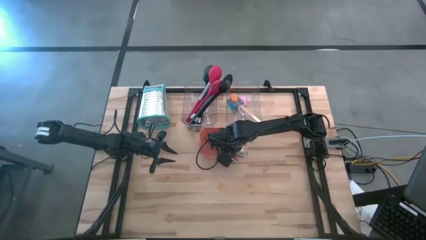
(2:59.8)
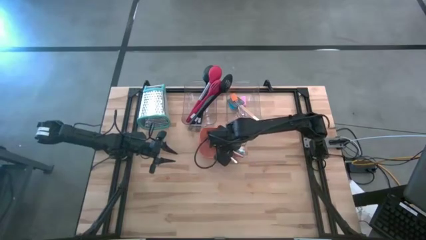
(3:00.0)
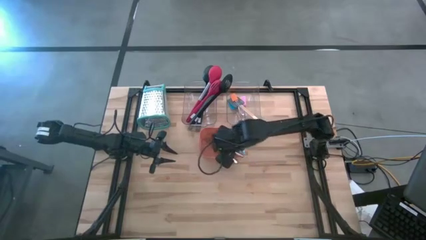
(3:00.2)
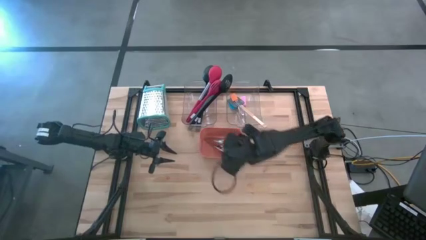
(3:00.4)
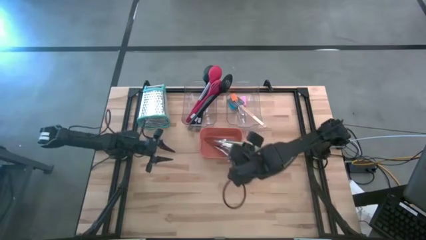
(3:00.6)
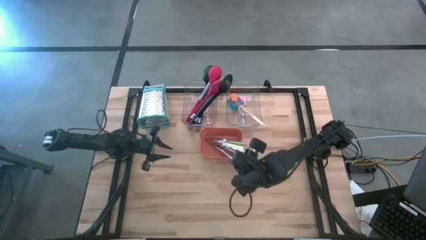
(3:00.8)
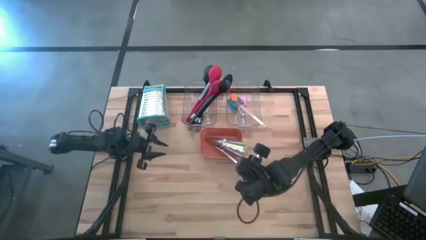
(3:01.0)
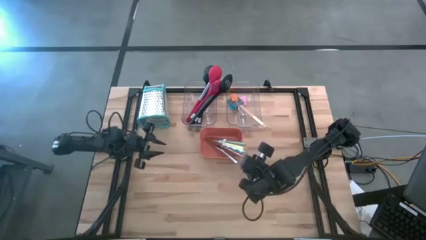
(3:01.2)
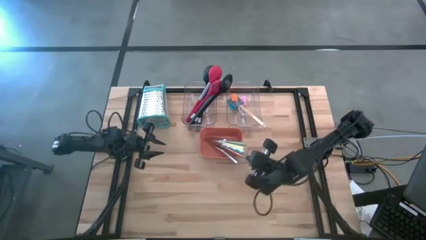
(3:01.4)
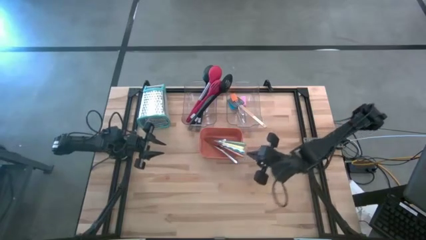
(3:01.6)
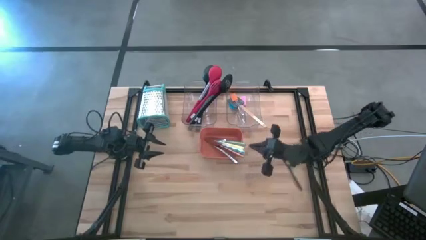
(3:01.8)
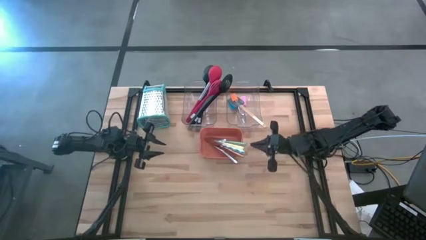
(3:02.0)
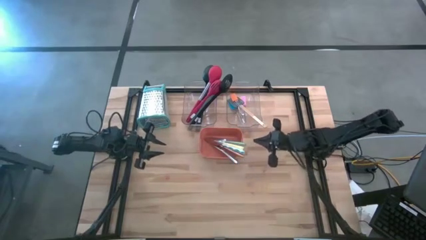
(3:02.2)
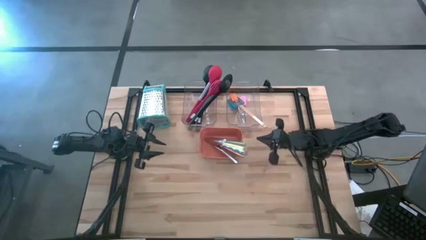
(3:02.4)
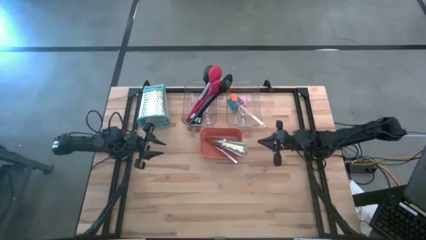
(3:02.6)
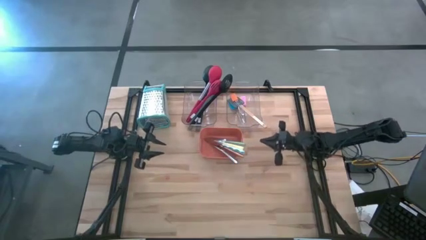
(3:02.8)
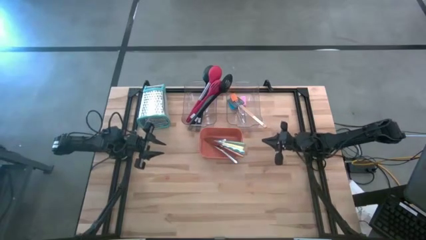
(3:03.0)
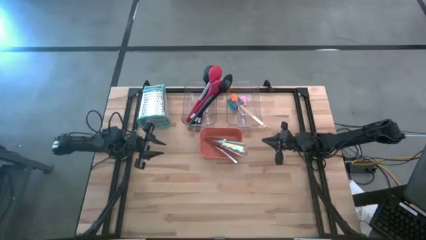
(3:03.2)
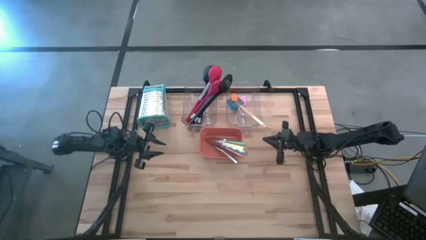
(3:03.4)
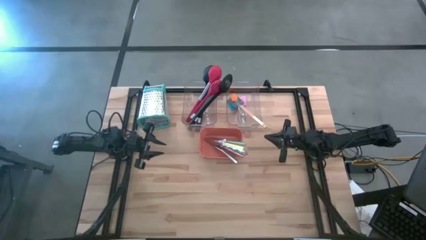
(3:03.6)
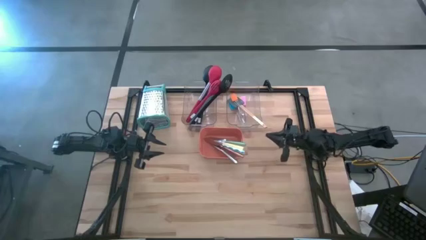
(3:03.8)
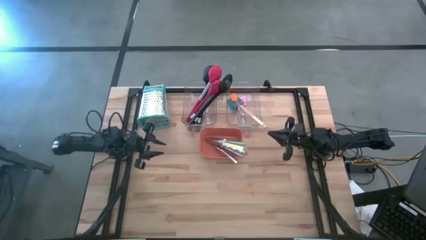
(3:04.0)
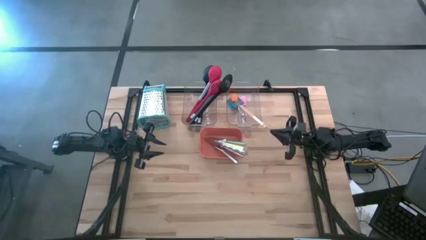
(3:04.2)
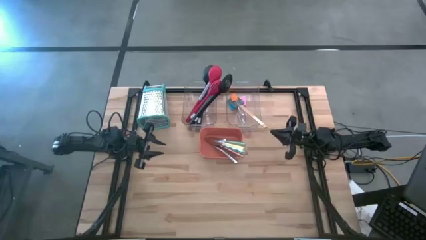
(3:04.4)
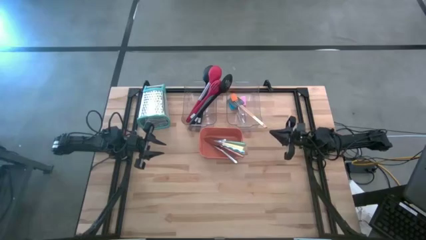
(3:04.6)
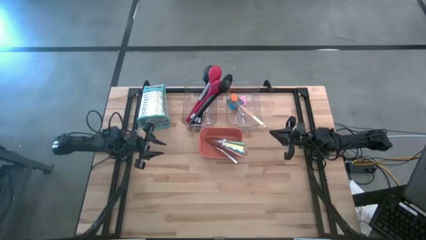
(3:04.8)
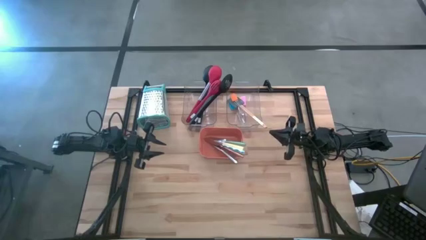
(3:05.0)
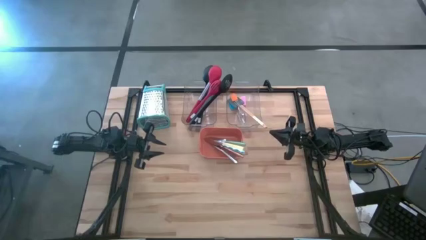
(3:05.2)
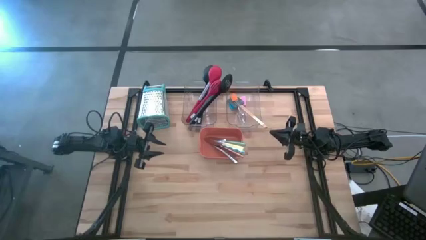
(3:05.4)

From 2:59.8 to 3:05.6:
Task: Pick & Place Kitchen Items
Return to Home Position

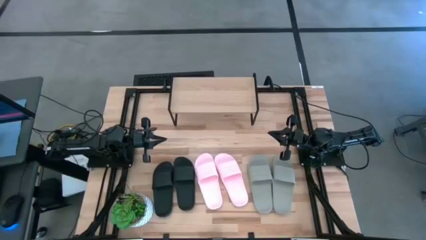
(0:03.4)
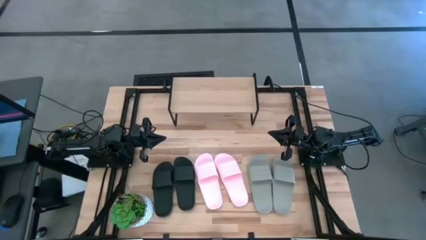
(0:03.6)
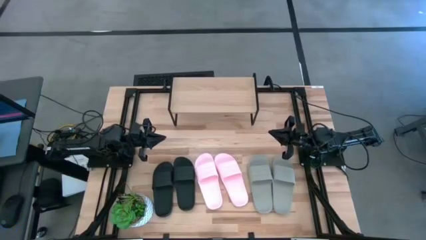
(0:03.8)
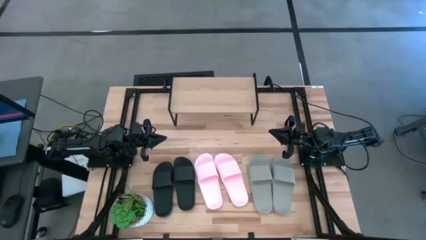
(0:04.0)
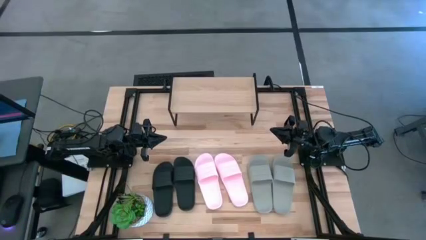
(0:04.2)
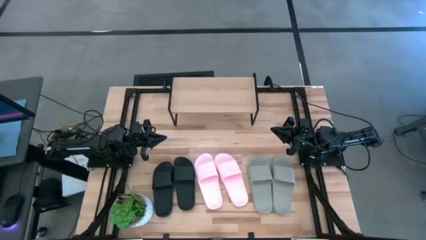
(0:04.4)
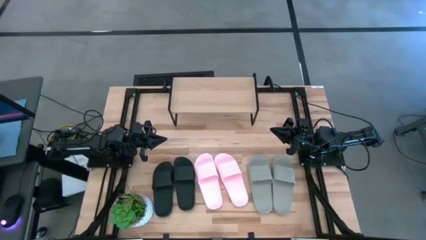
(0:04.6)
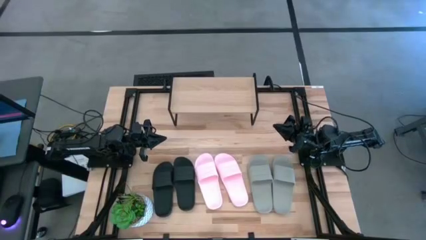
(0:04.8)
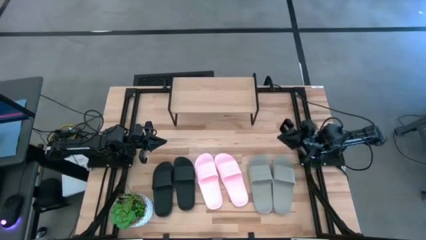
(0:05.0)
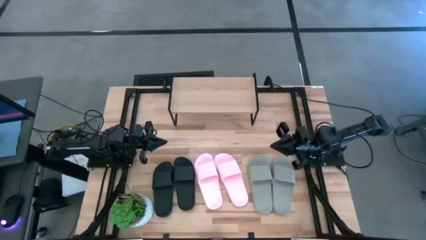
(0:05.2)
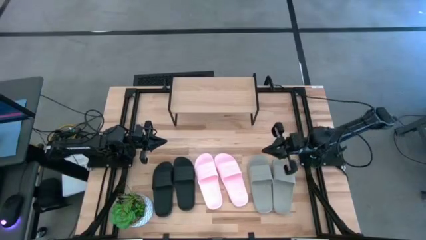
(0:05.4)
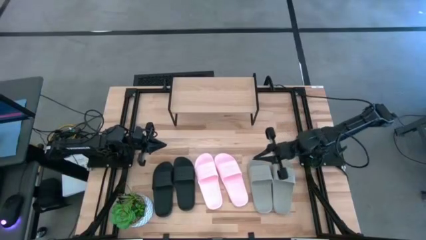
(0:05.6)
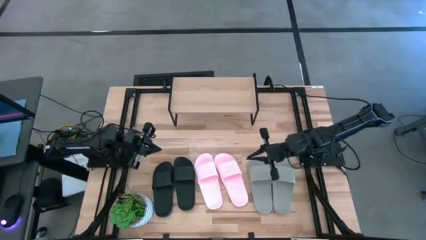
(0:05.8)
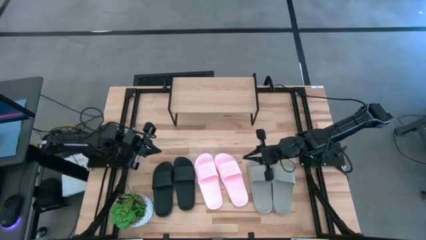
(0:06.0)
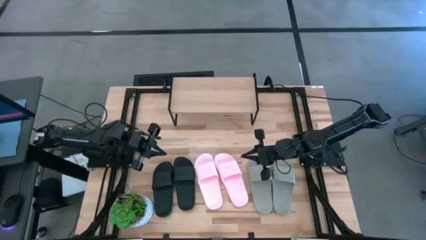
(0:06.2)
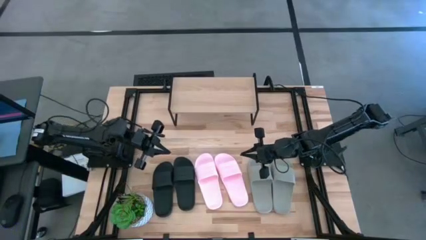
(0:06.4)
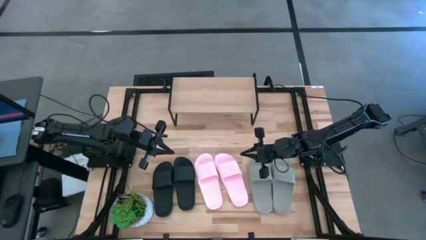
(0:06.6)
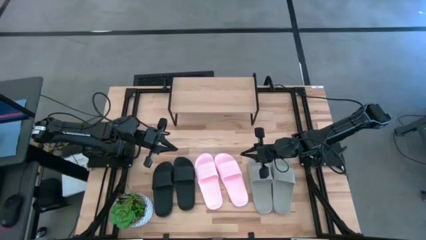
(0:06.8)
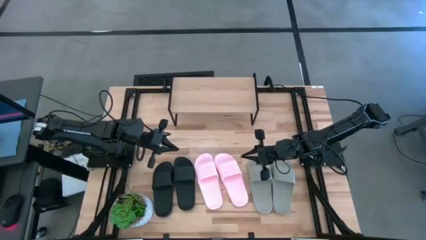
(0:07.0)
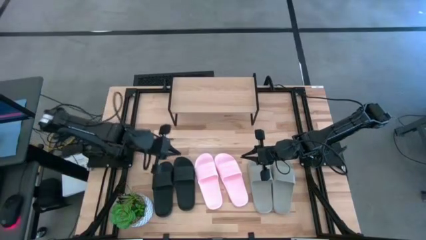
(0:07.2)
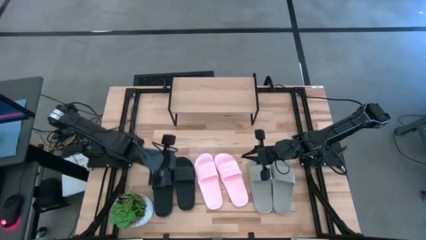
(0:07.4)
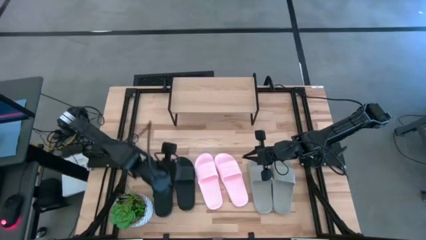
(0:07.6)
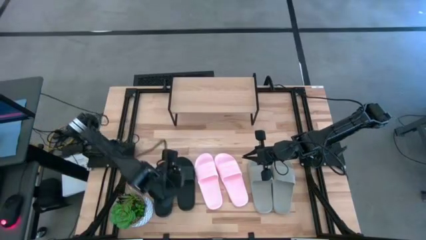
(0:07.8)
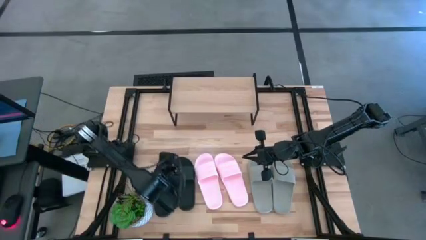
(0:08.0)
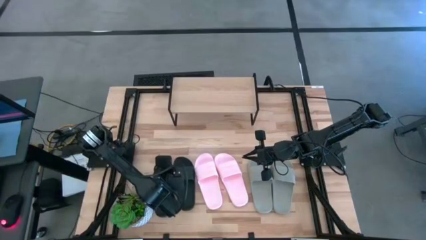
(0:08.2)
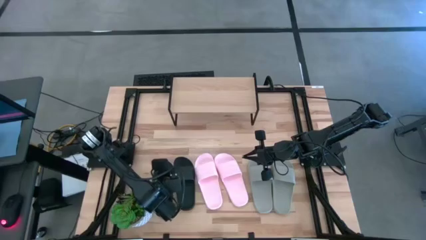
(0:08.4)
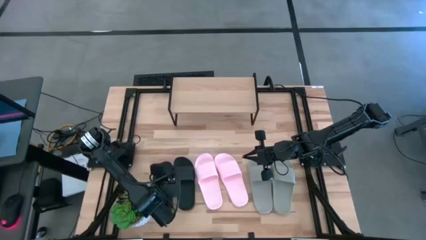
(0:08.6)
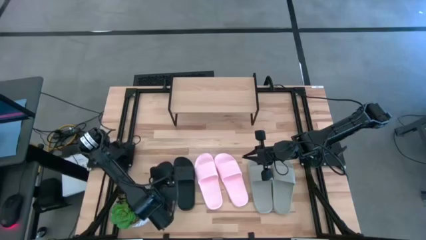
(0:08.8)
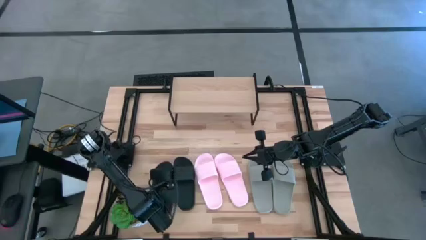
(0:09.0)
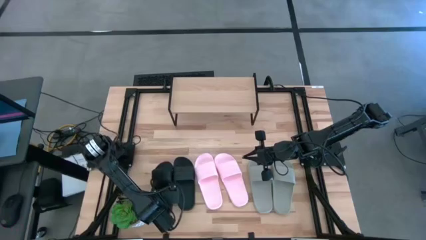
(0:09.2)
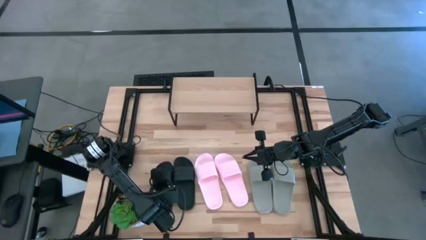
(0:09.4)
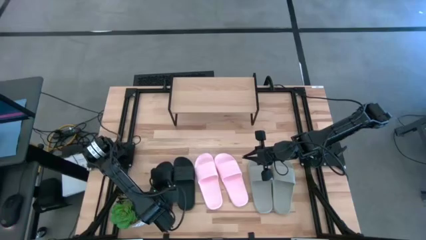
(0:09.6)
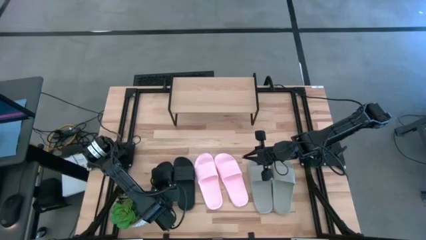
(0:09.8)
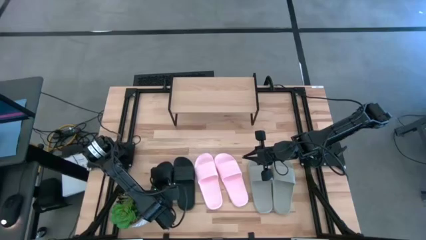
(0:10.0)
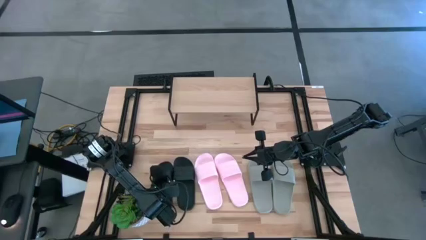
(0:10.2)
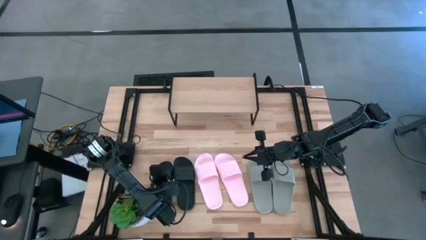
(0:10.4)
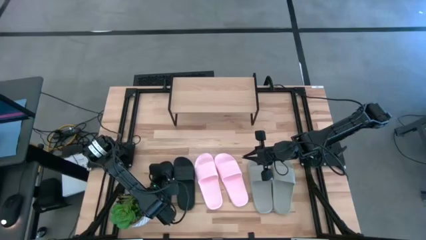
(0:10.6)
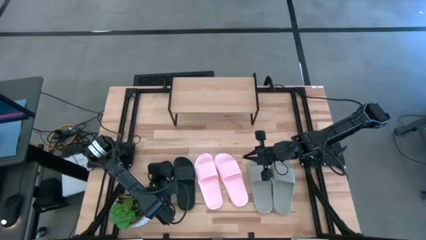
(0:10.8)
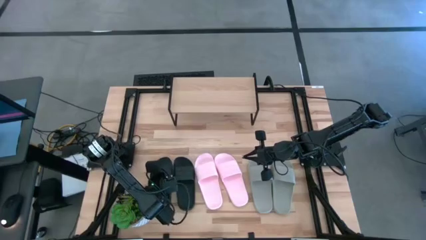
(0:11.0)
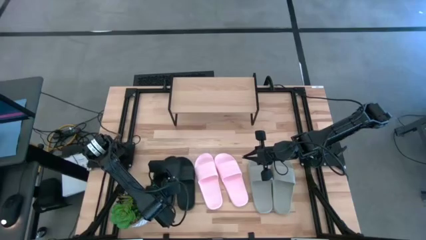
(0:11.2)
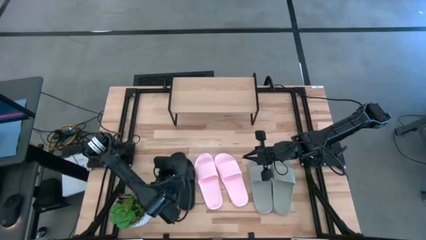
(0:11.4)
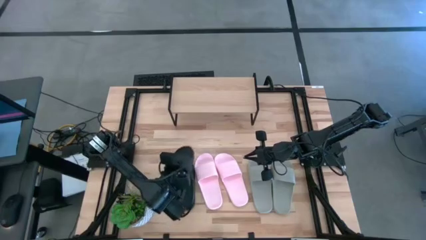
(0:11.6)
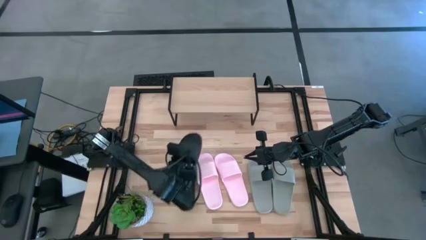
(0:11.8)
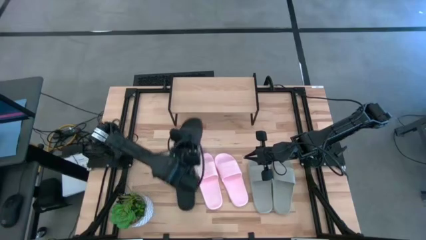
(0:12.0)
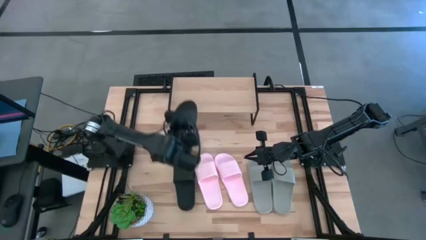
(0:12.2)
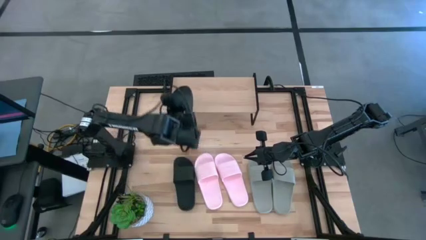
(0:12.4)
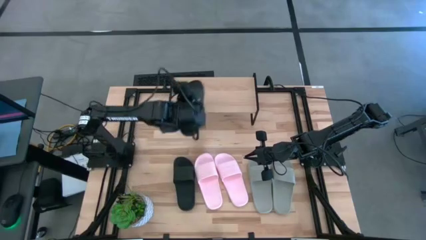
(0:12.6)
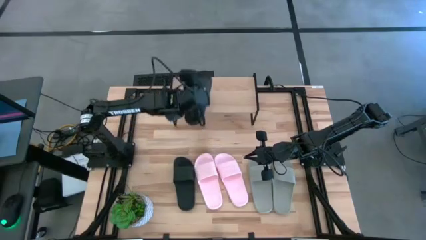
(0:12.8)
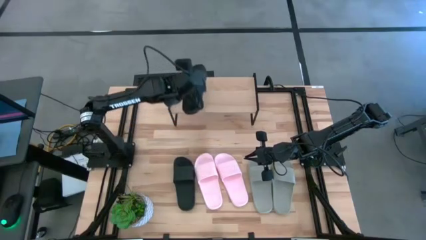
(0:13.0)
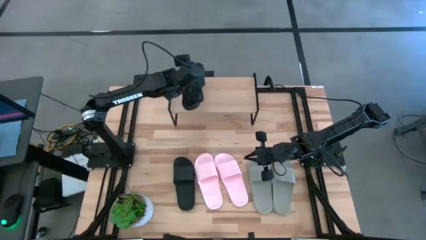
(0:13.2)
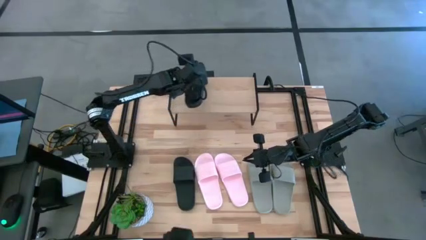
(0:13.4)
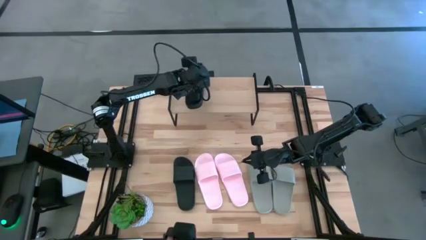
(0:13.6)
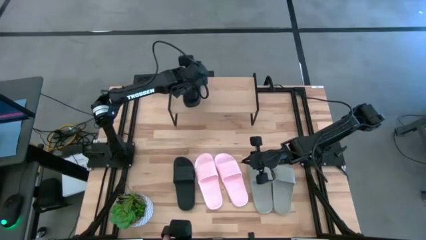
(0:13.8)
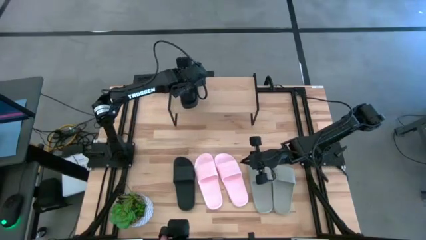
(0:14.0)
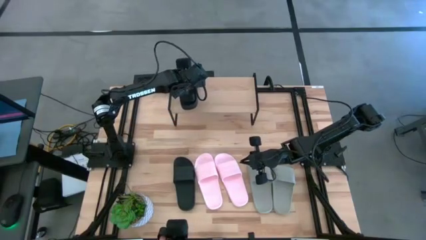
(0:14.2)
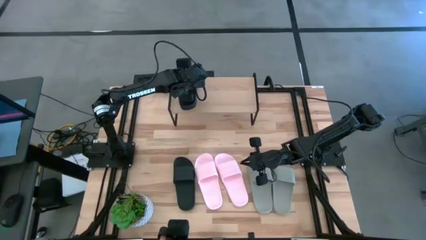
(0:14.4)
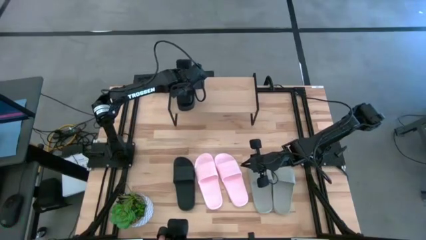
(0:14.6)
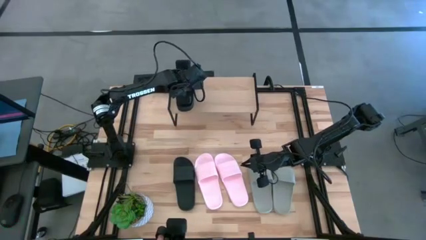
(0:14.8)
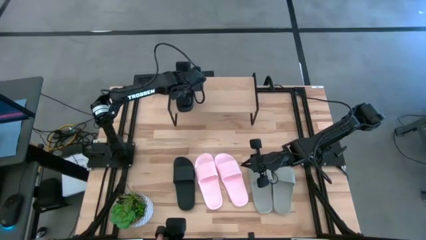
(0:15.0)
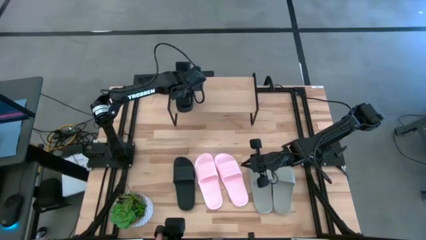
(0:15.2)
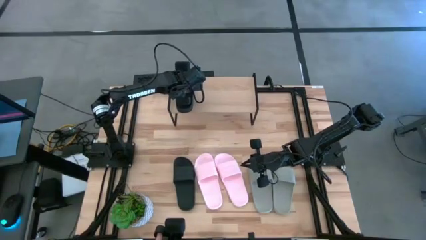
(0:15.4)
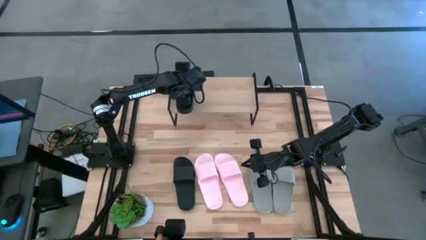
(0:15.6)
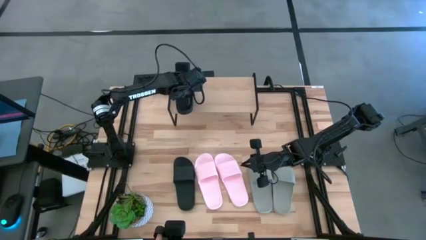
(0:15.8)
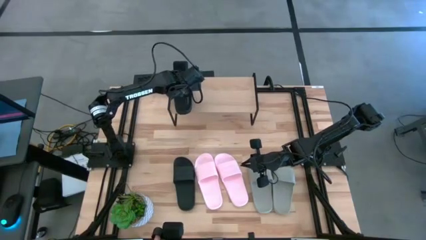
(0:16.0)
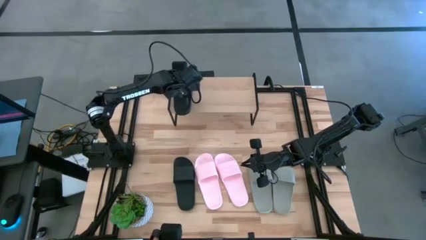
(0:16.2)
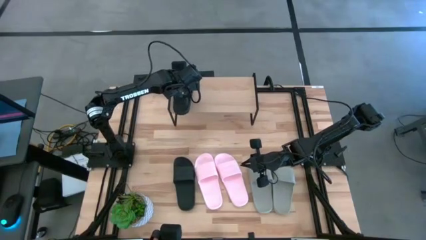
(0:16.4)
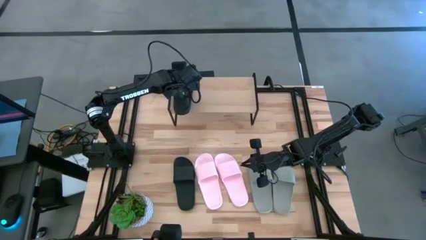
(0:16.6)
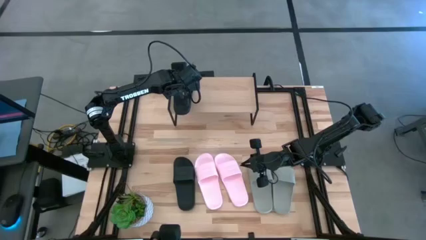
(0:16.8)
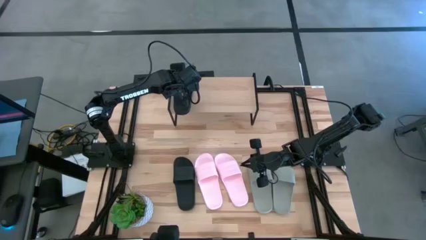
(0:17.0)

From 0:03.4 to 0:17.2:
Task: Pick and place slides into the shelf
Put the left black slide on the shelf
